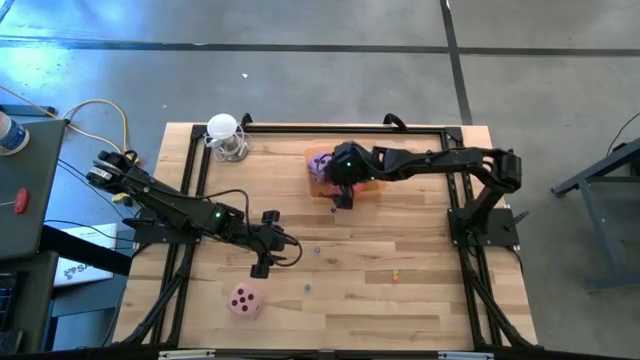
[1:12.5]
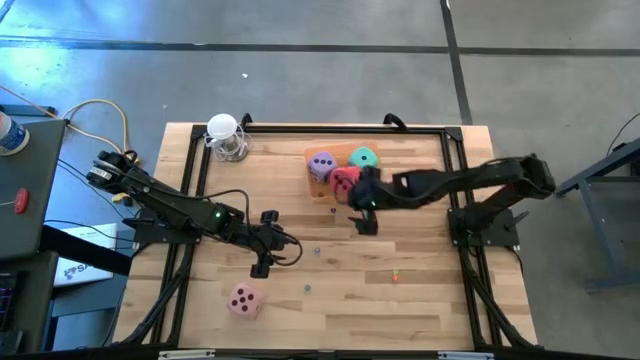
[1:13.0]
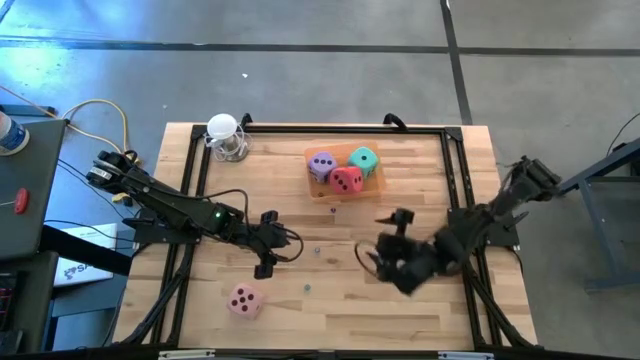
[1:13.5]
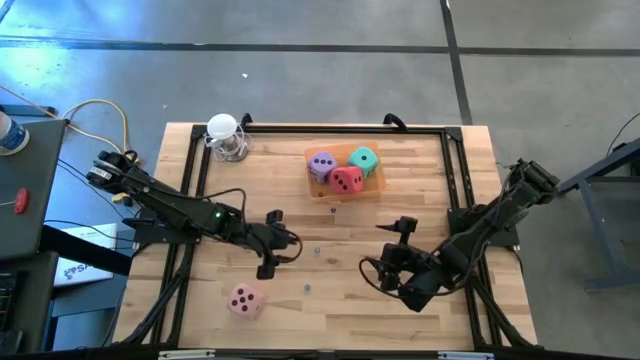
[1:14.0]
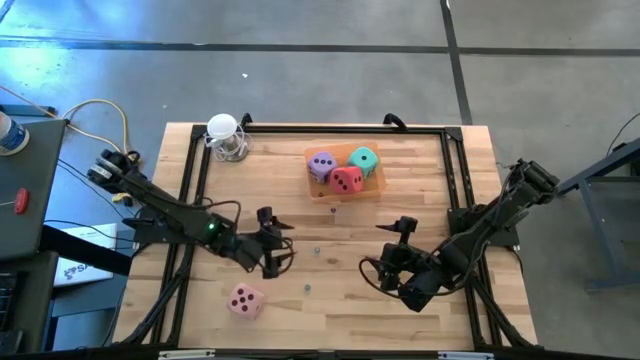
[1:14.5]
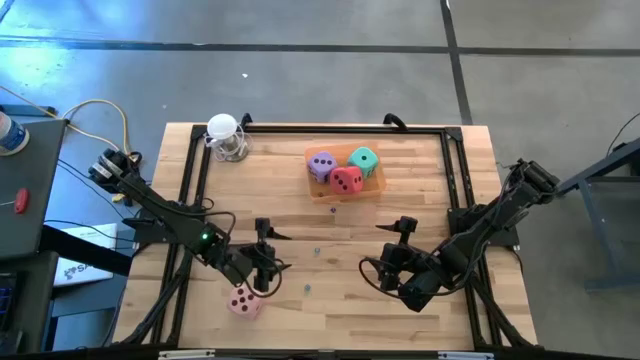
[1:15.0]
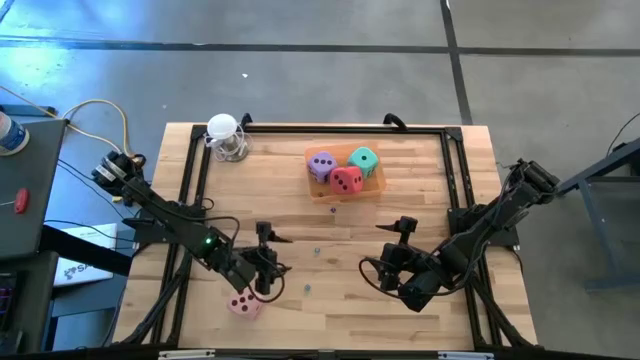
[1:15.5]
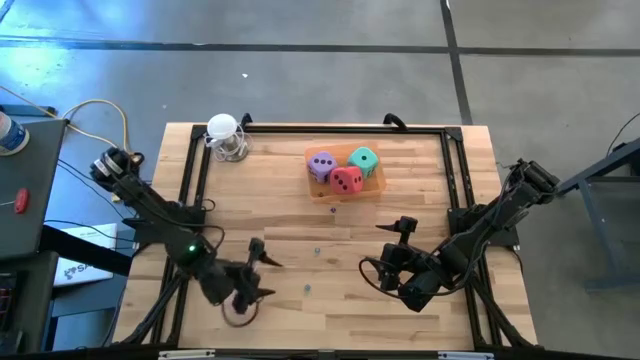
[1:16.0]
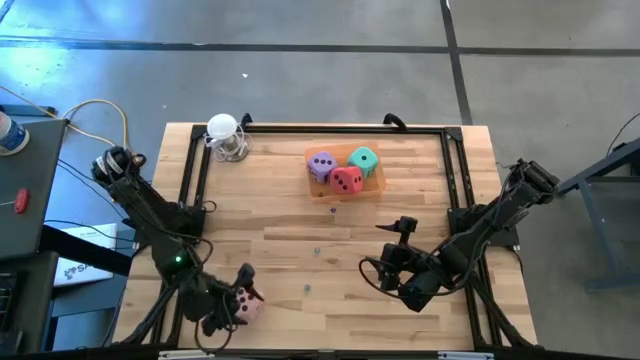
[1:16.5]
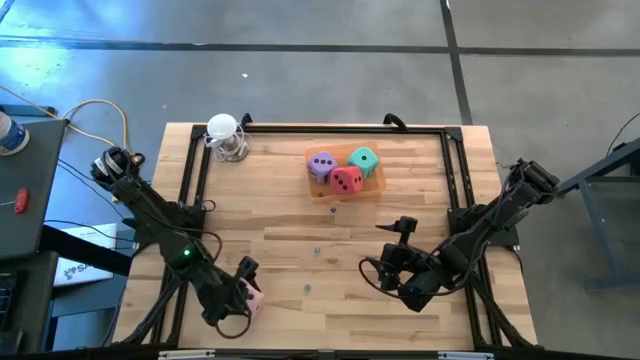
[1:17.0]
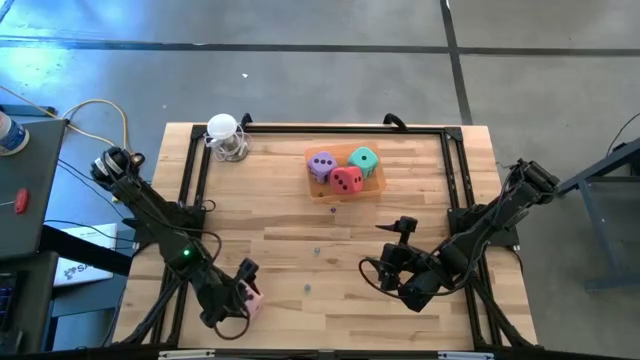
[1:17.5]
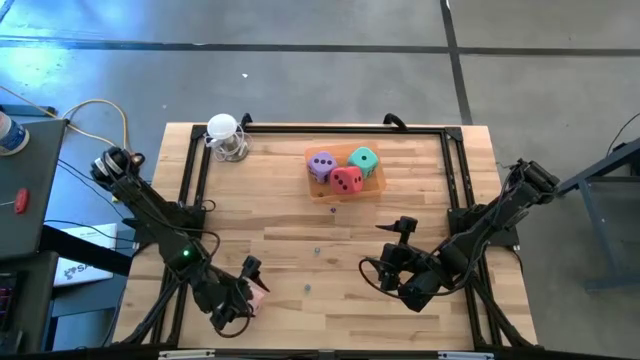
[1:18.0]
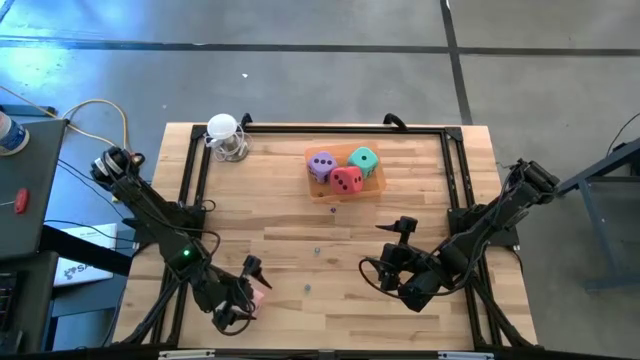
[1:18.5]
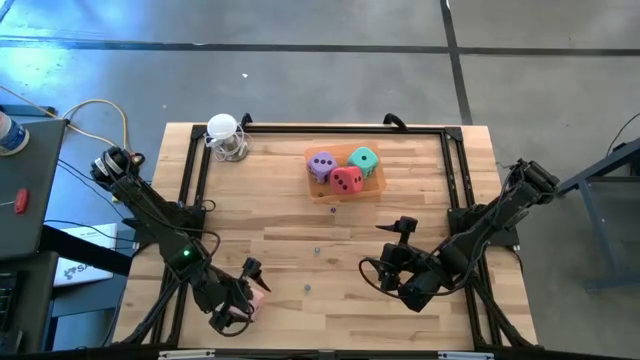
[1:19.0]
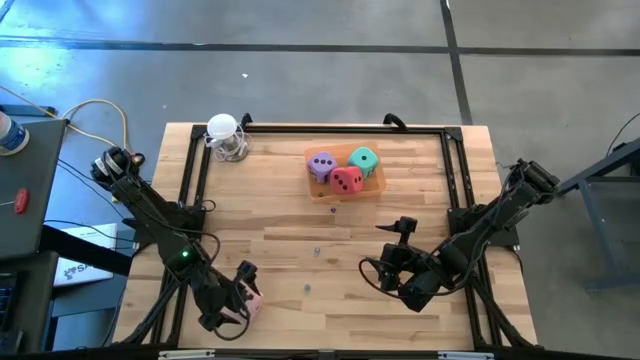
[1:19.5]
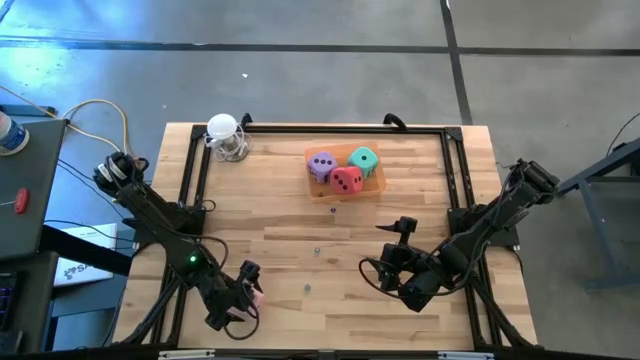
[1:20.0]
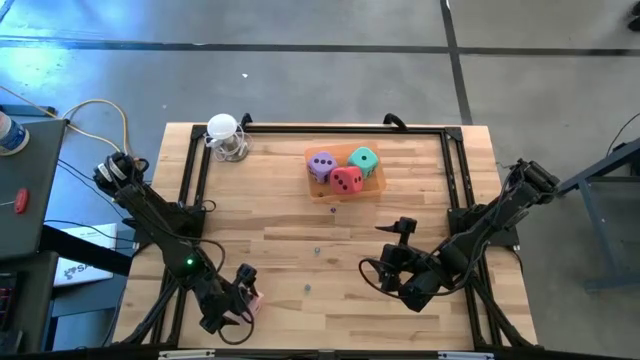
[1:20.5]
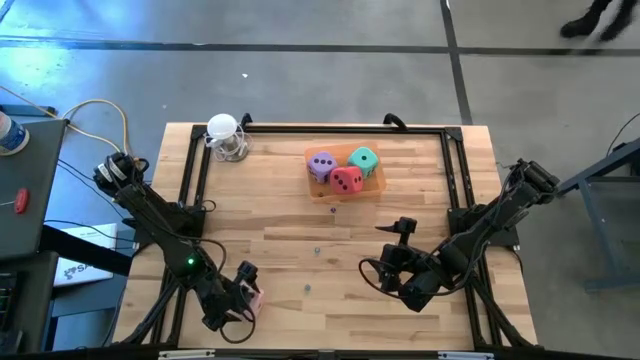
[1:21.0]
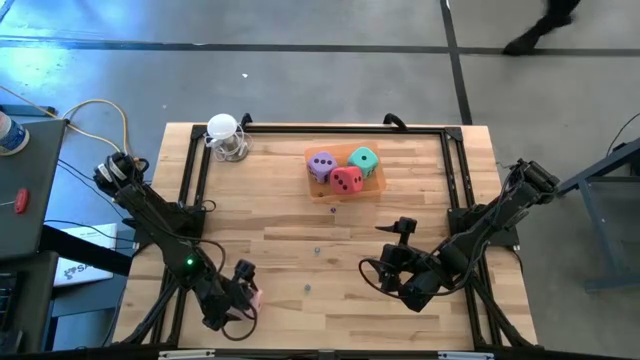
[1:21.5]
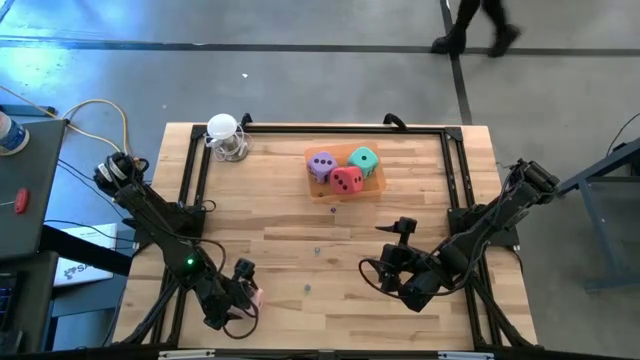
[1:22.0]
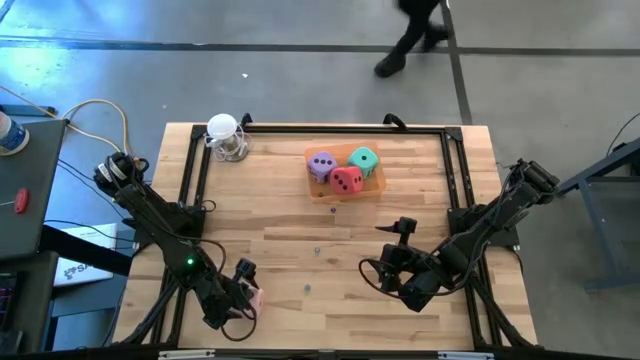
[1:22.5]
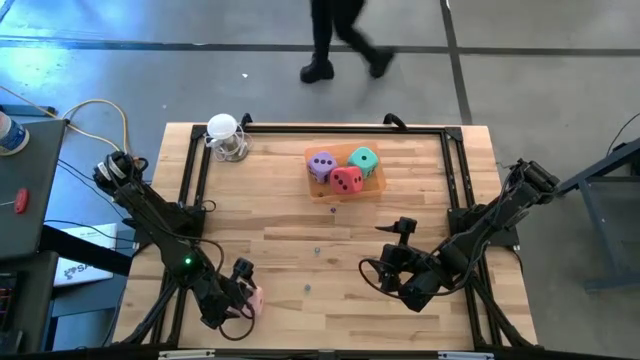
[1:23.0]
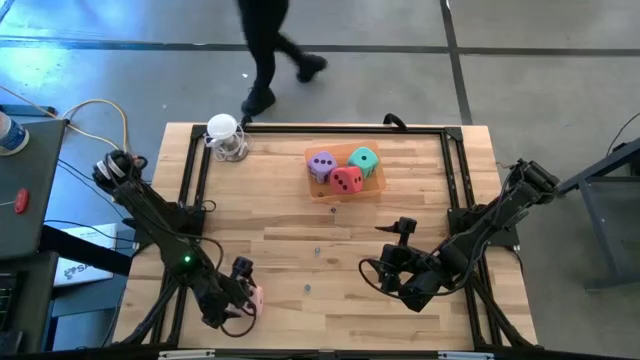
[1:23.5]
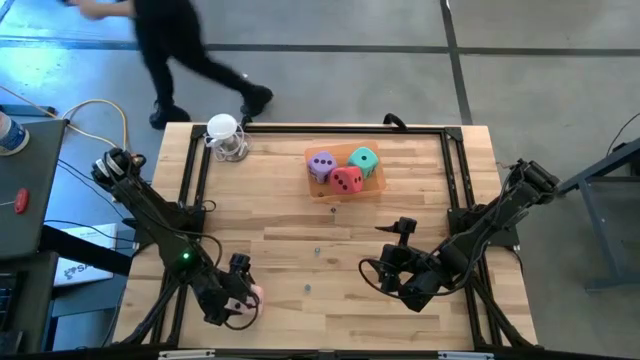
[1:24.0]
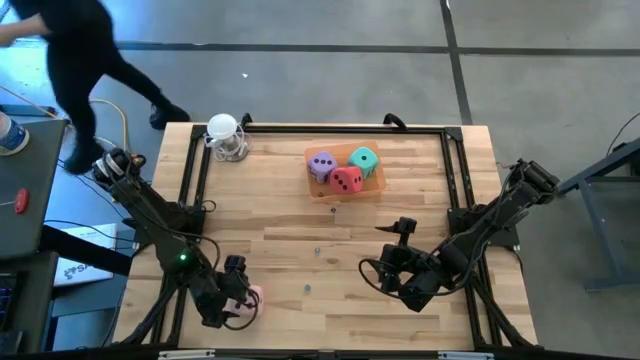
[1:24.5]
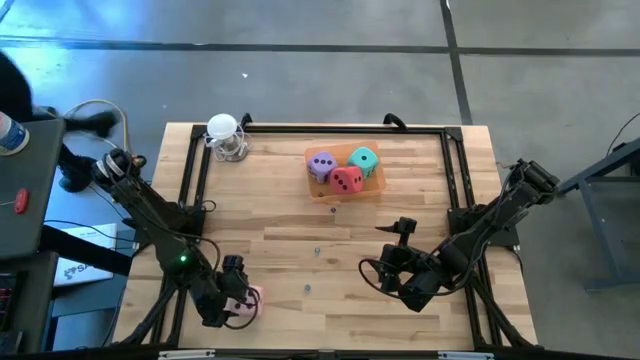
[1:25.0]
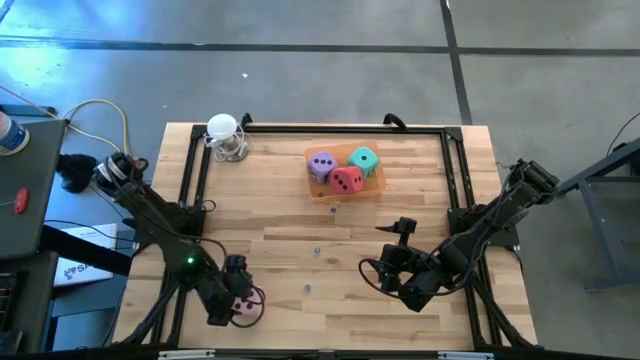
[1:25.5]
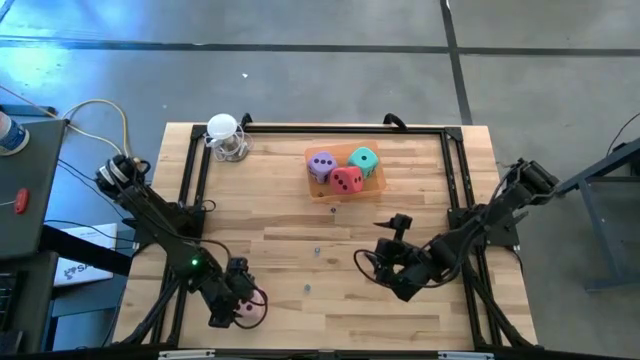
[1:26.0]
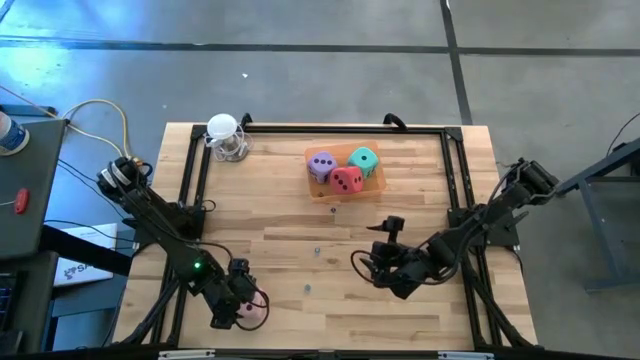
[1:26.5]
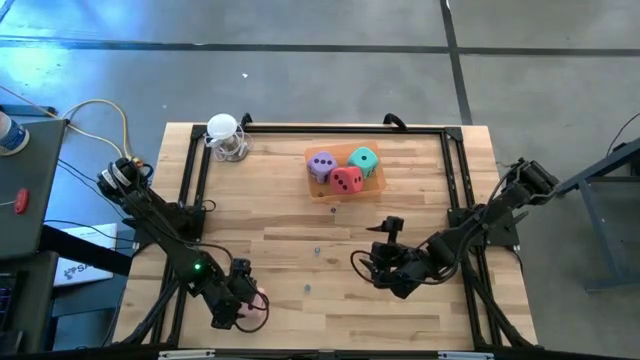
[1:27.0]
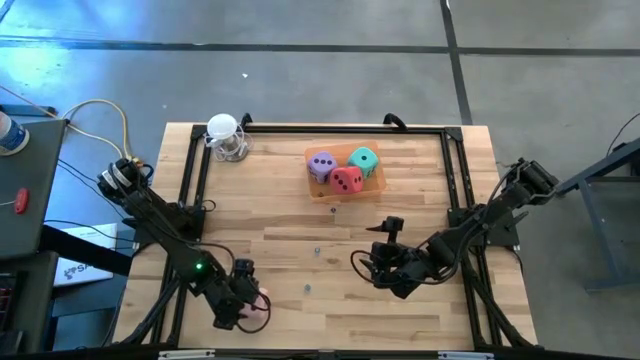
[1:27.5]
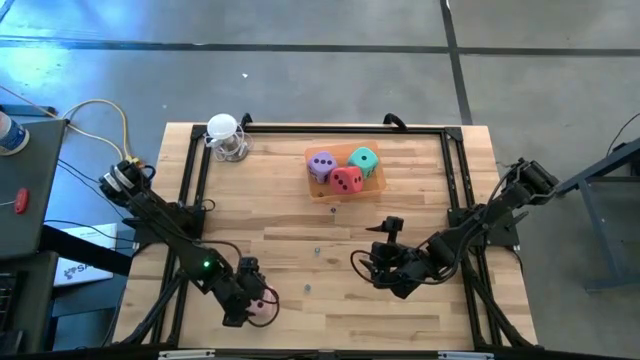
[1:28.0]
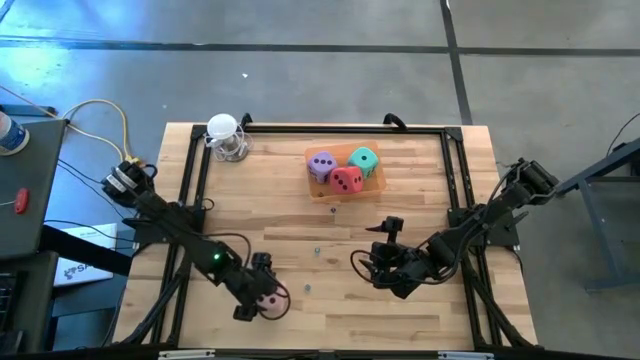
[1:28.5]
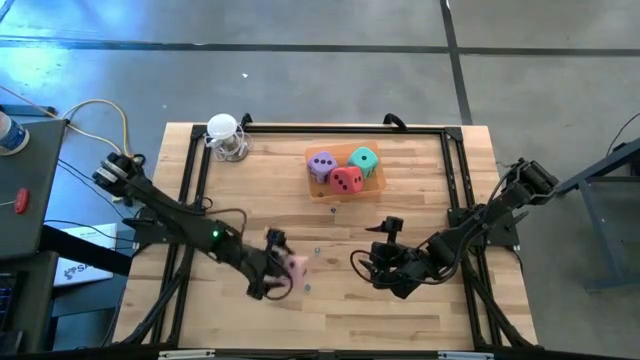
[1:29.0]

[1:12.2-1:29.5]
Task: Pick & Place Dice
Put the large pink dice into the orange container

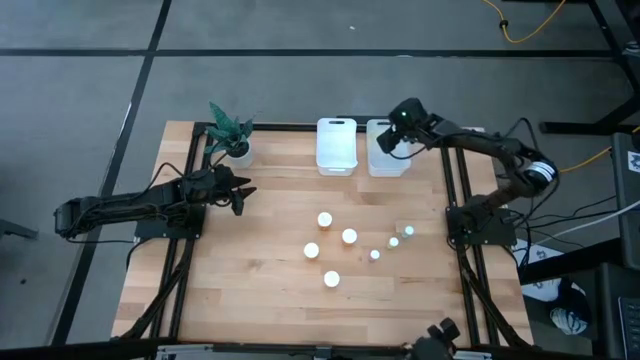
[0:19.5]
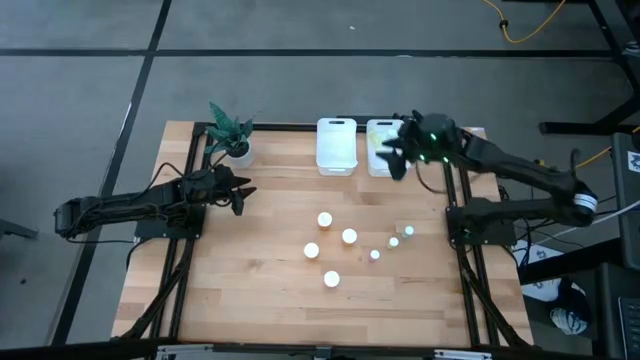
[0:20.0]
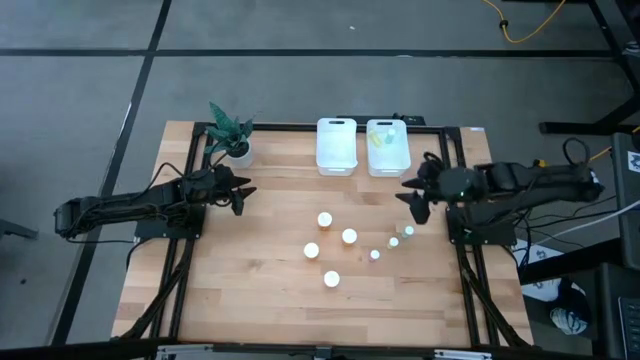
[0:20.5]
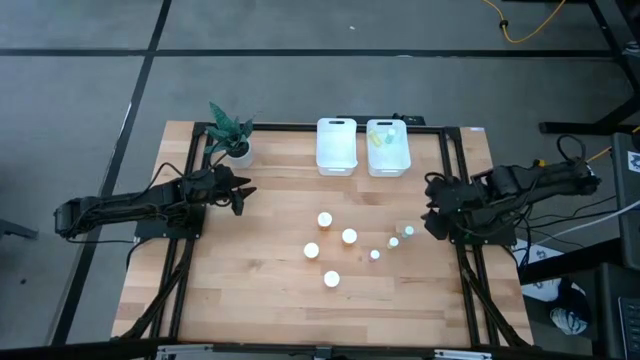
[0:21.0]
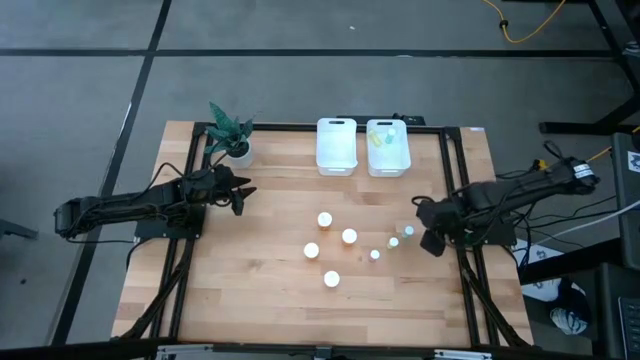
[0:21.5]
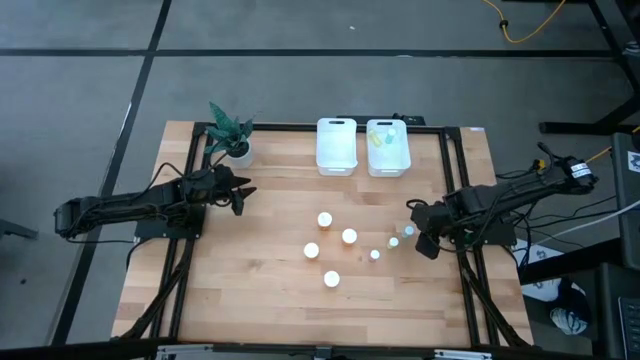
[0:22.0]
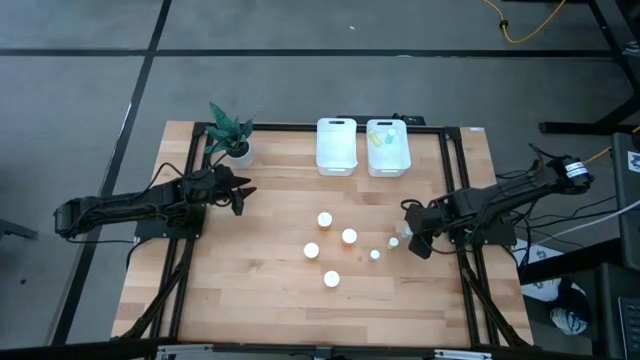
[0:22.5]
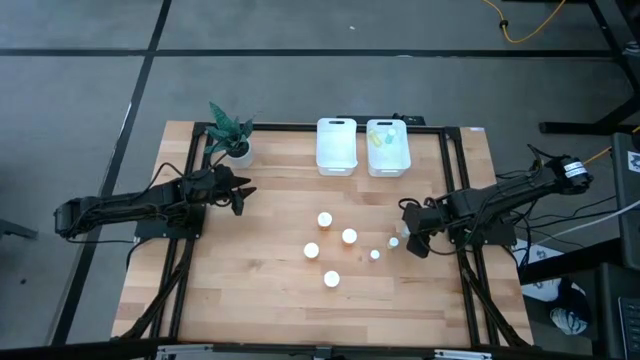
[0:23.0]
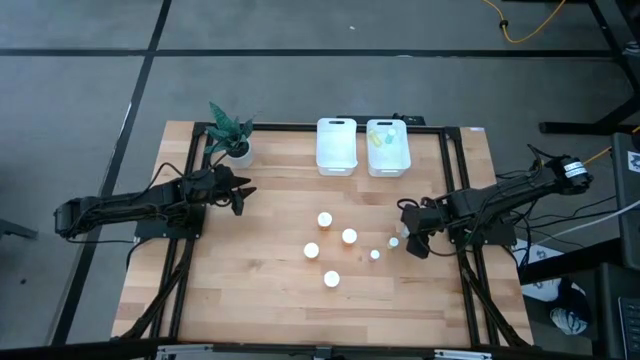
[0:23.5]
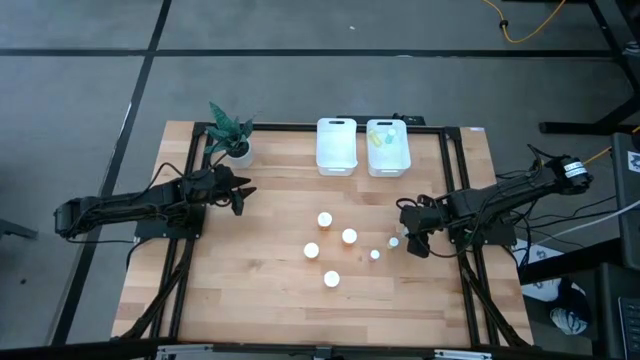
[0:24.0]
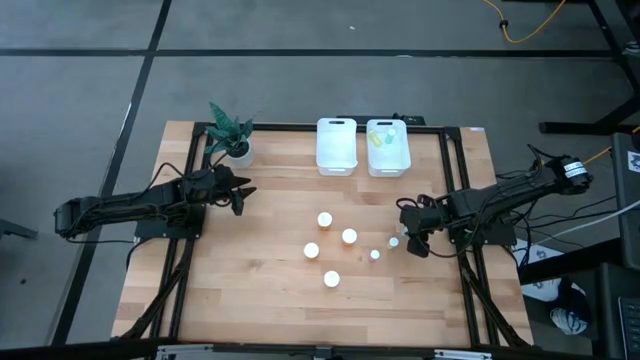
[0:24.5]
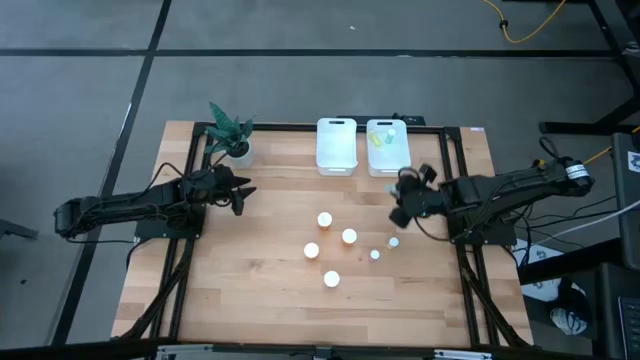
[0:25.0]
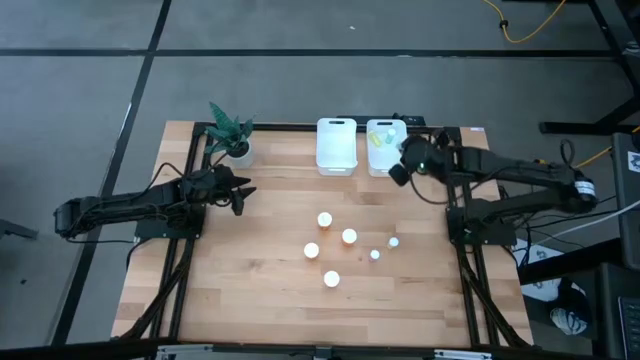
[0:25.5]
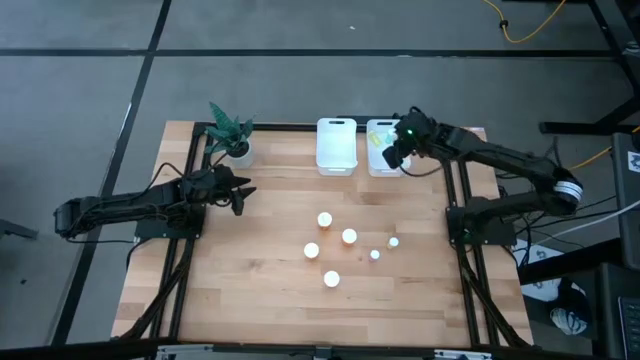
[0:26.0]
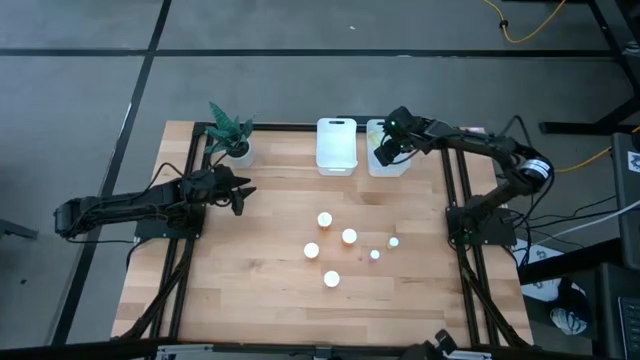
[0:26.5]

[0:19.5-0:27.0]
Task: Pick and place medicine bottles into bin by pill shape (circle, oval)
Put the small blue pill bottle into the right white bin
